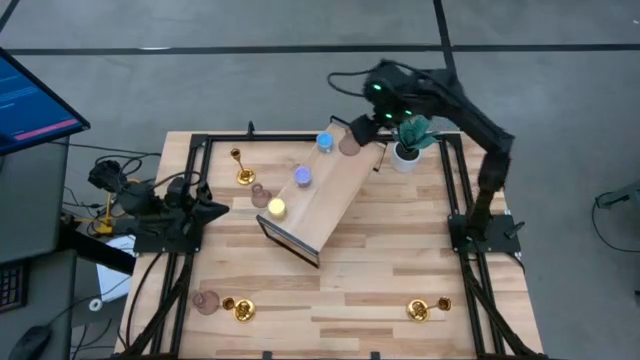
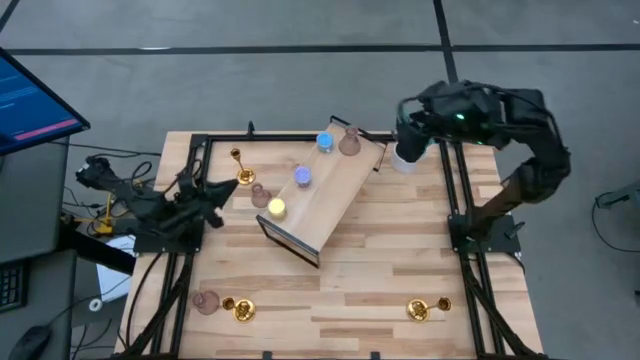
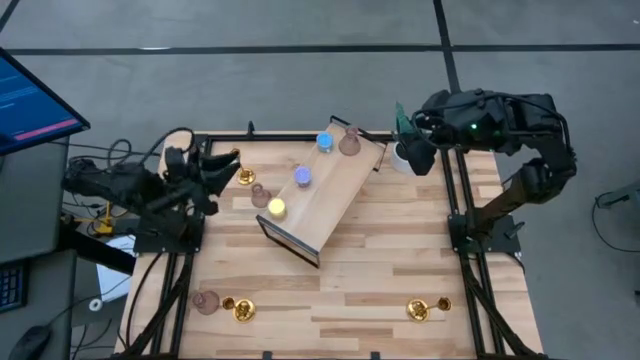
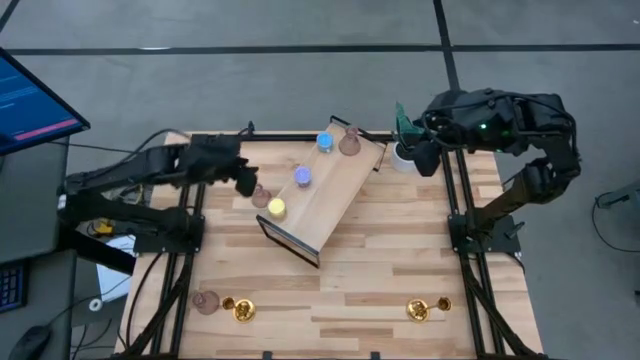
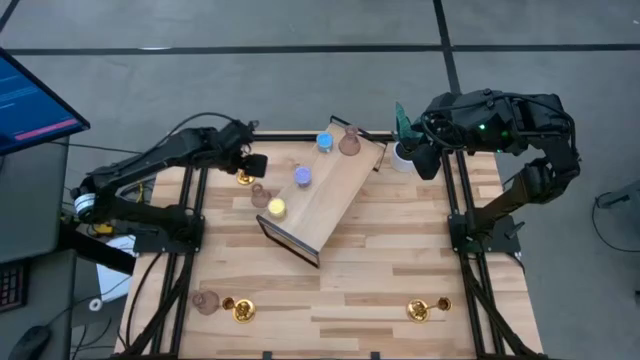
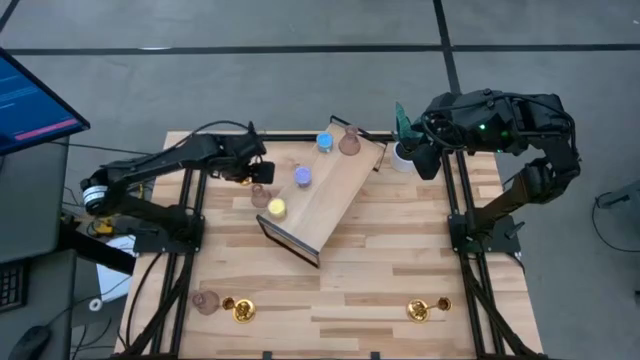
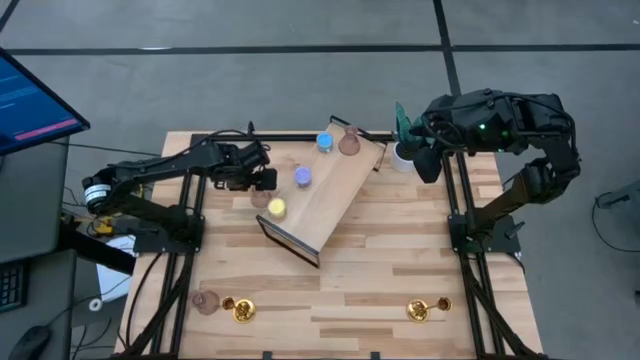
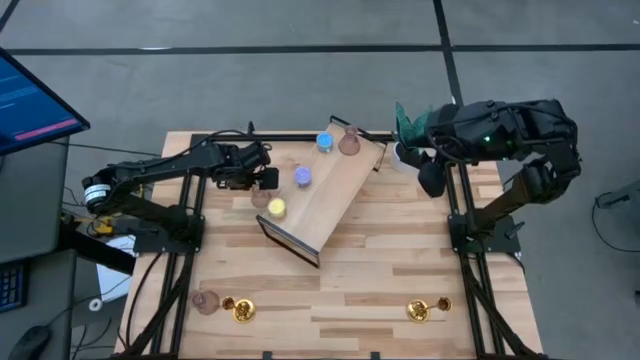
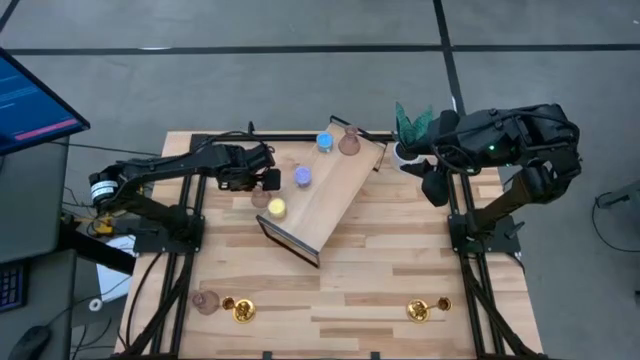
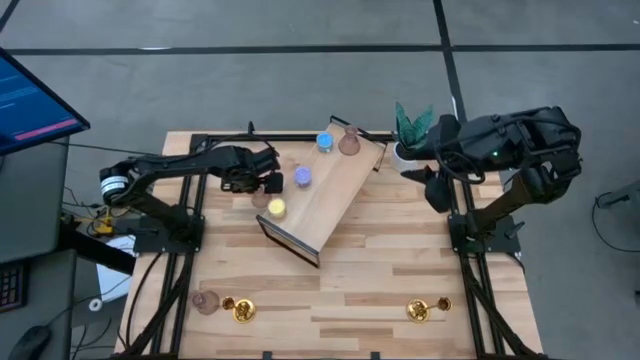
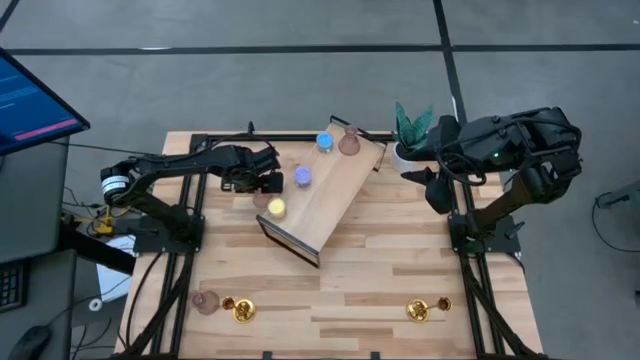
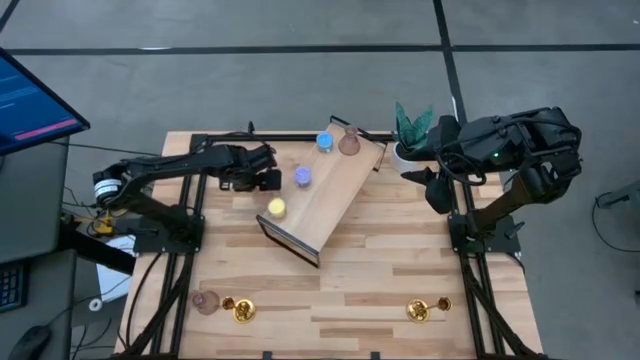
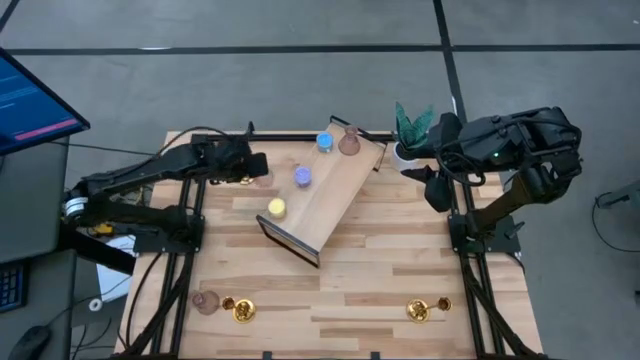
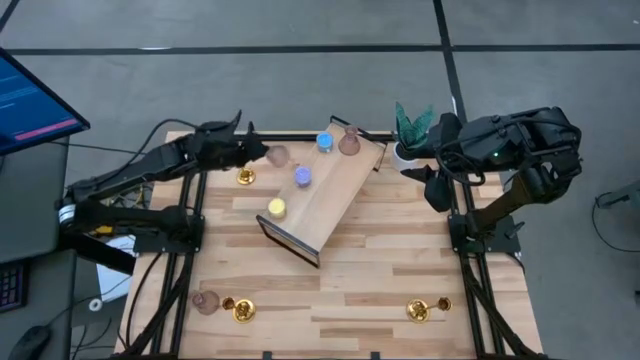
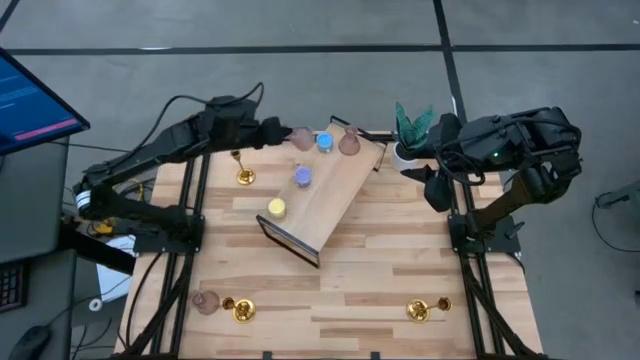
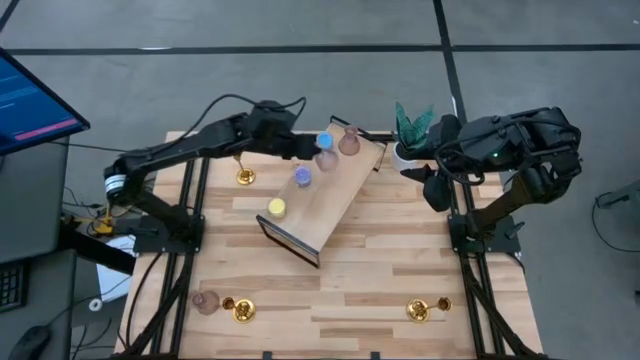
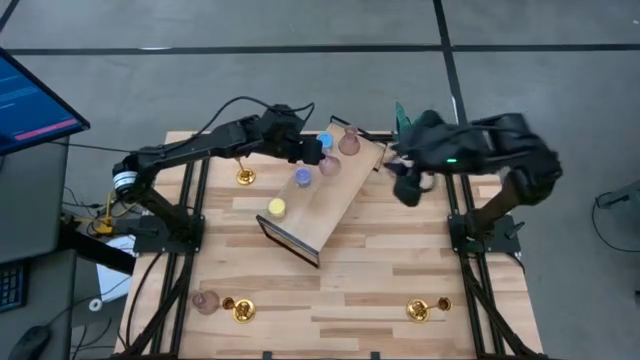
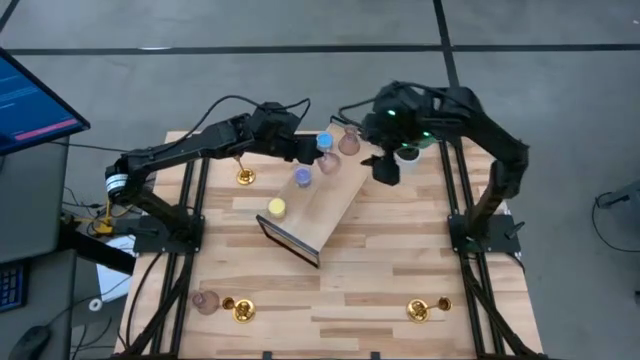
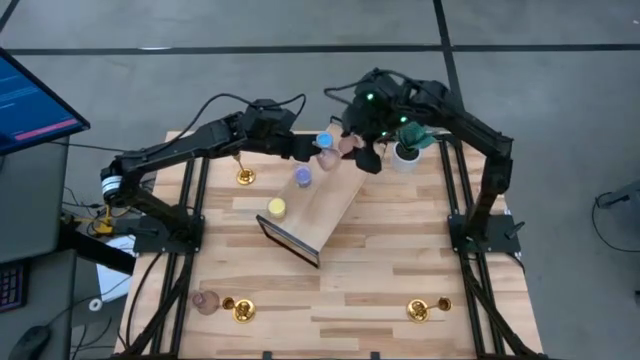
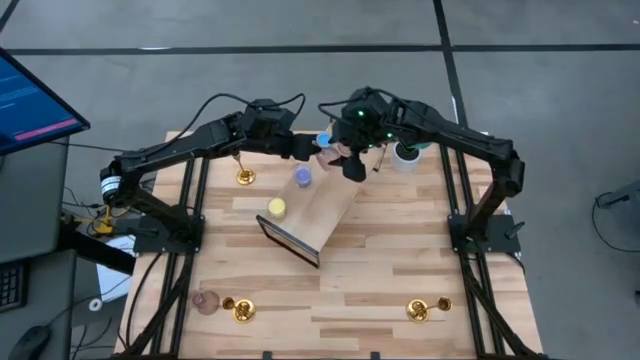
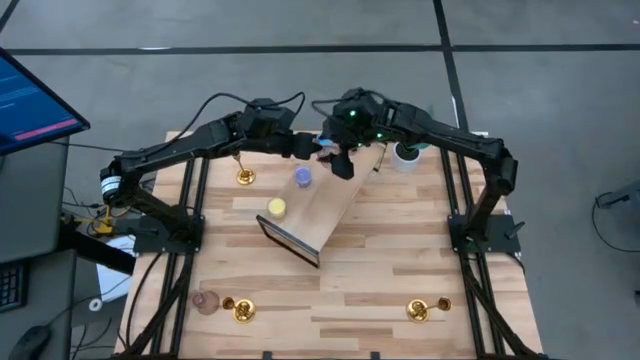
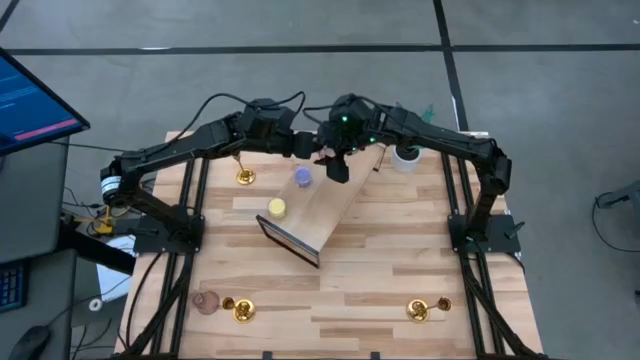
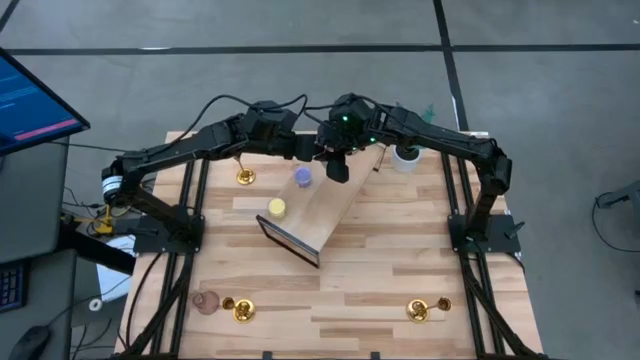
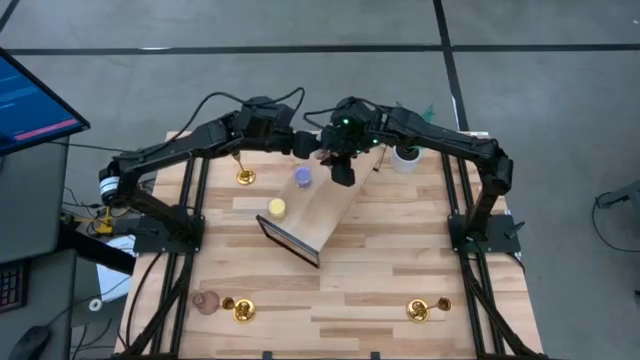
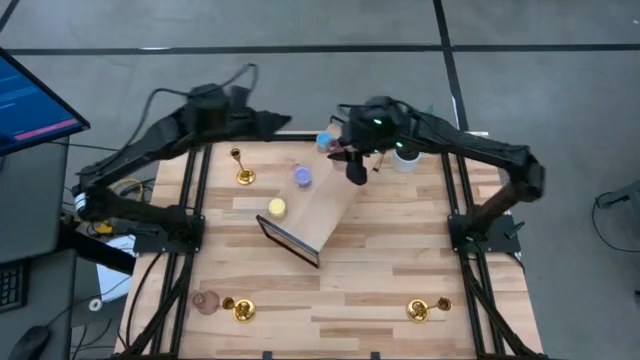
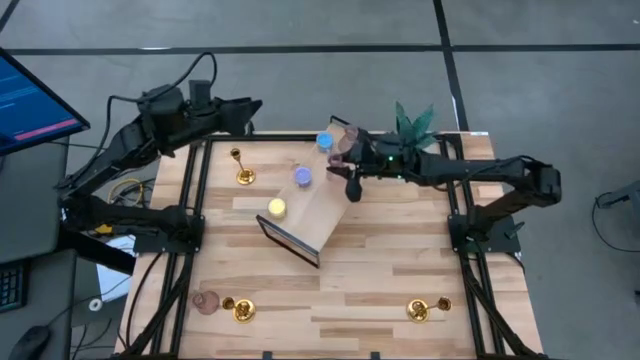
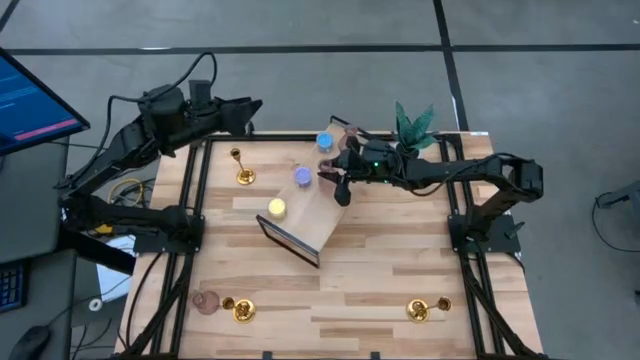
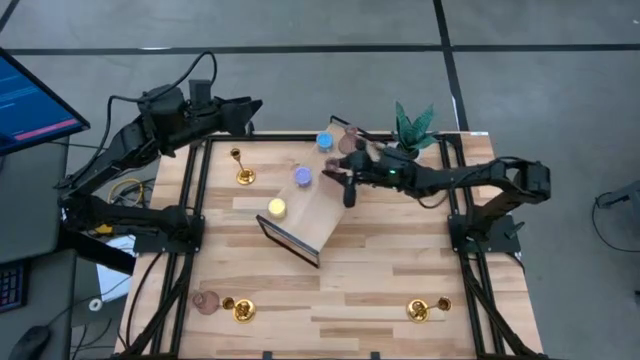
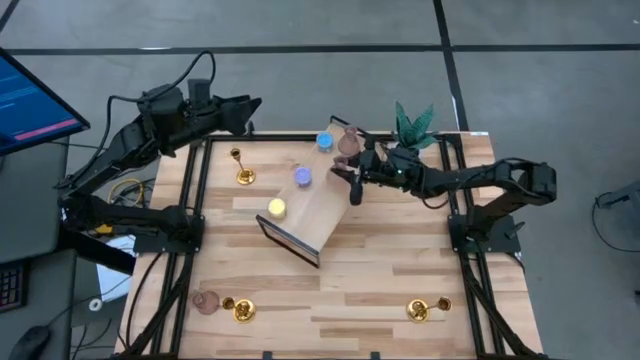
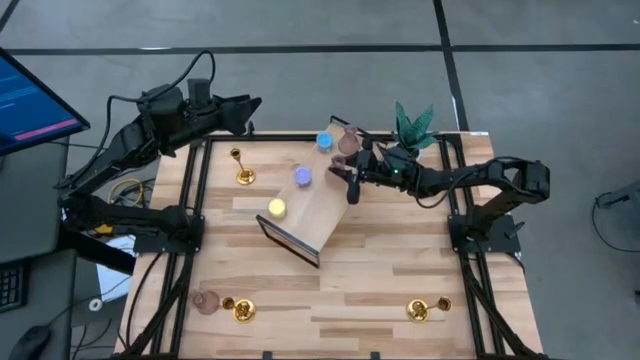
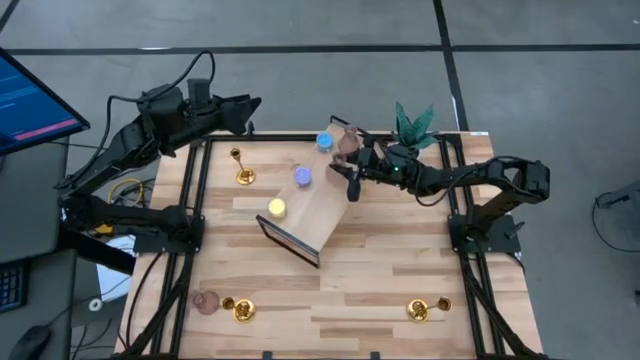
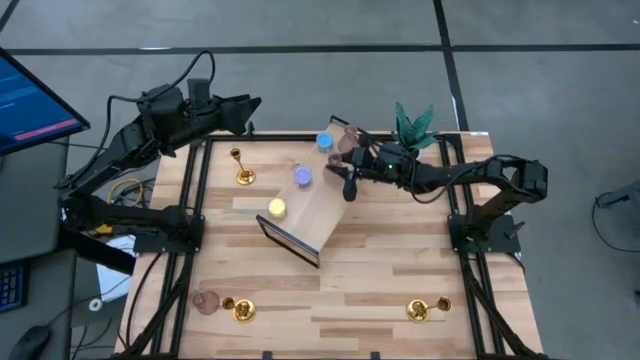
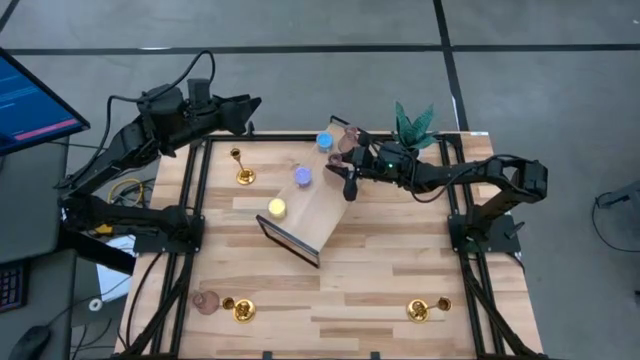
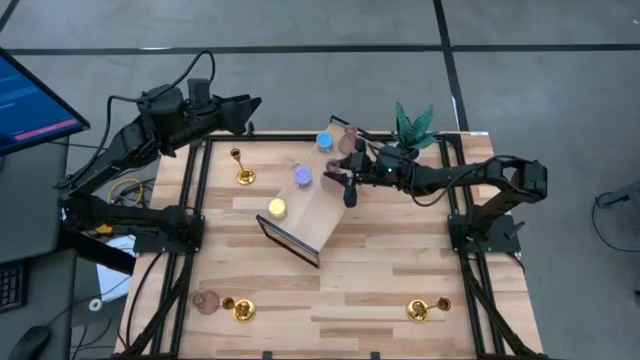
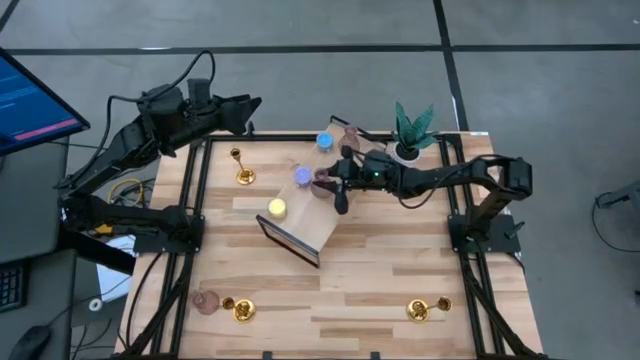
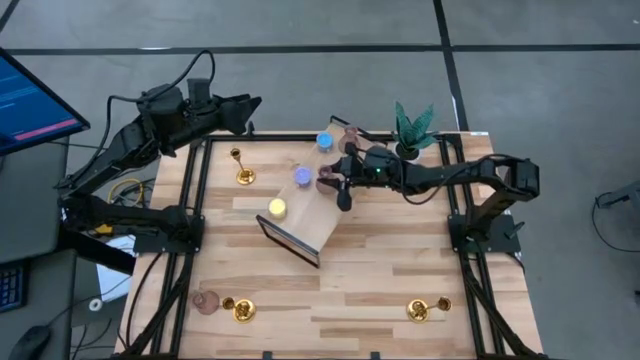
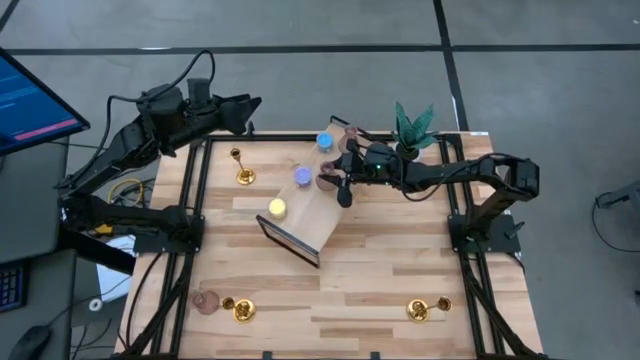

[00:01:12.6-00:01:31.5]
Task: Pick & Place candle stick holders
Put the top glass candle holder on the shelf

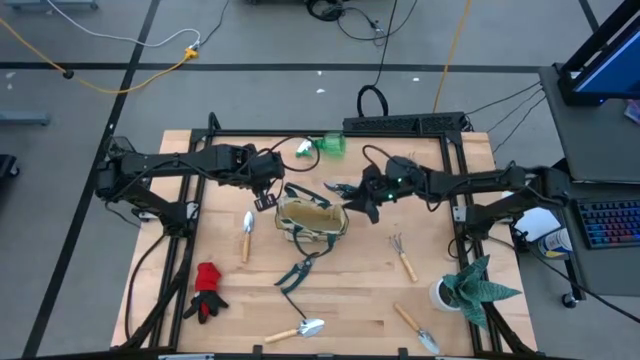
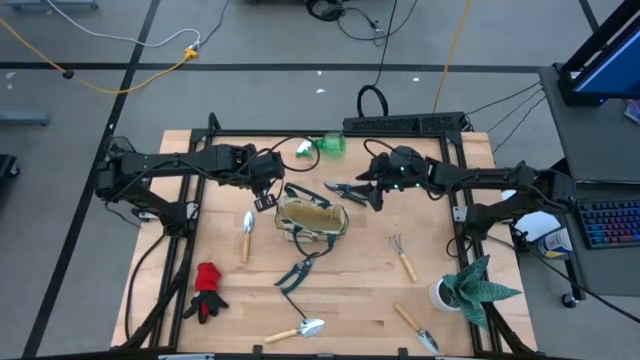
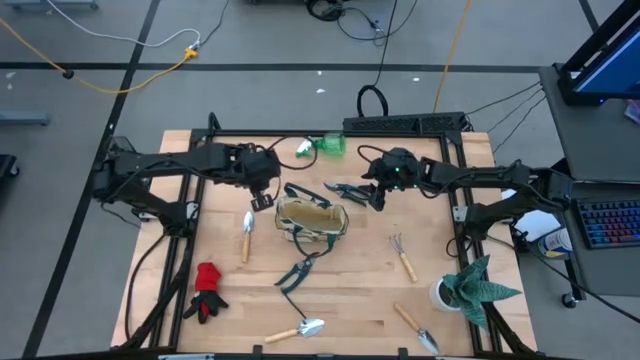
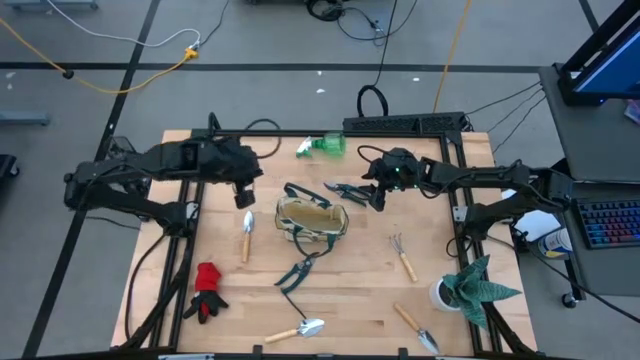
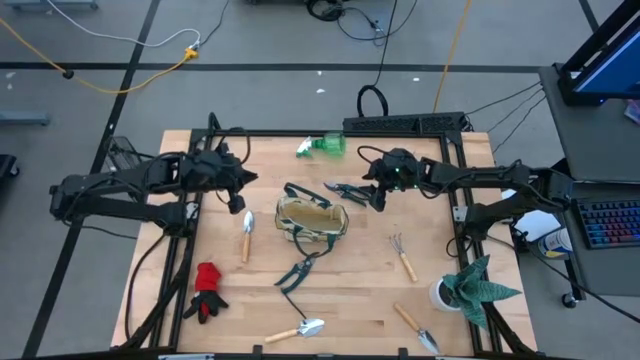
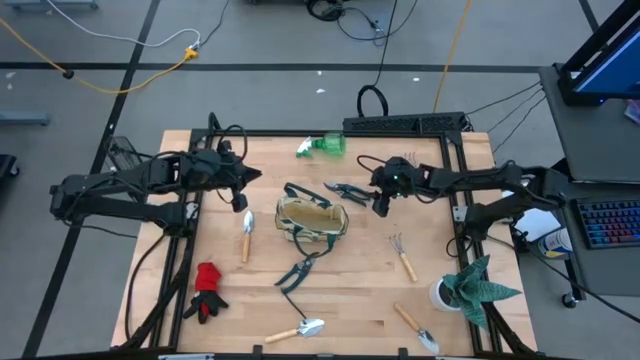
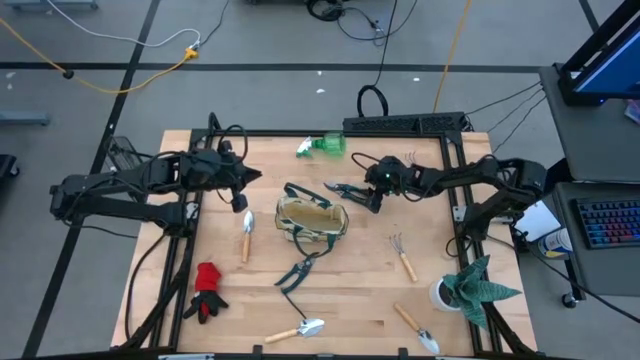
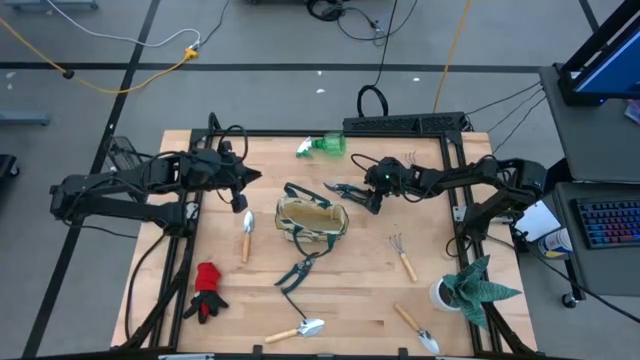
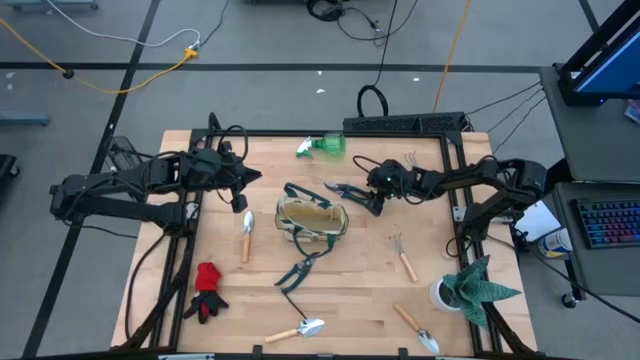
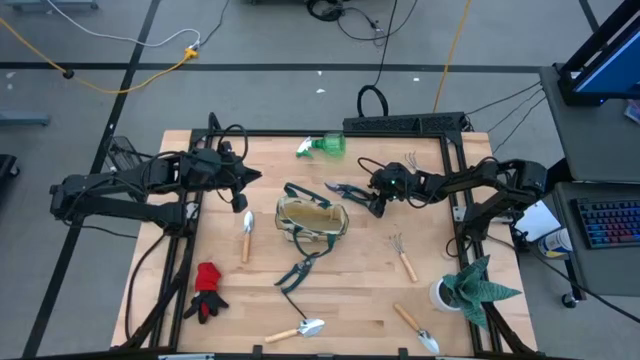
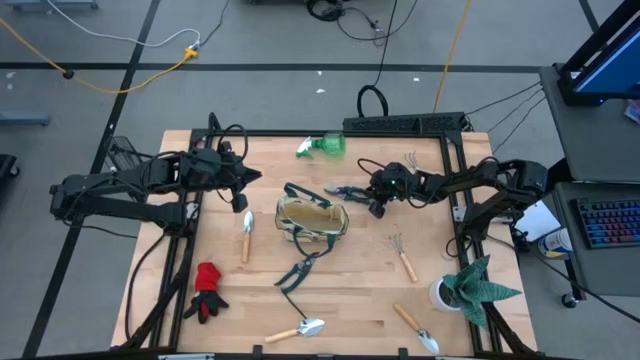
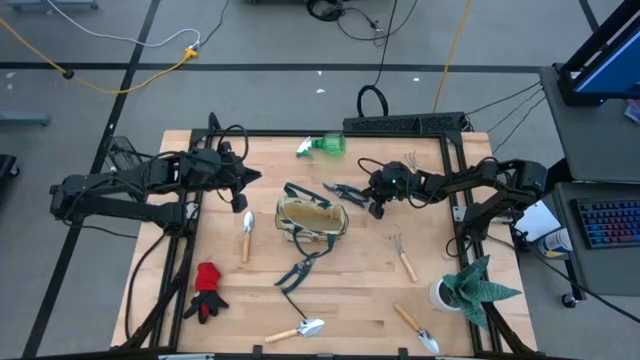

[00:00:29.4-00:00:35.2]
Task: Pick & Place Garden tools in Gardening bag
Put the top green shears into the brown gardening bag
